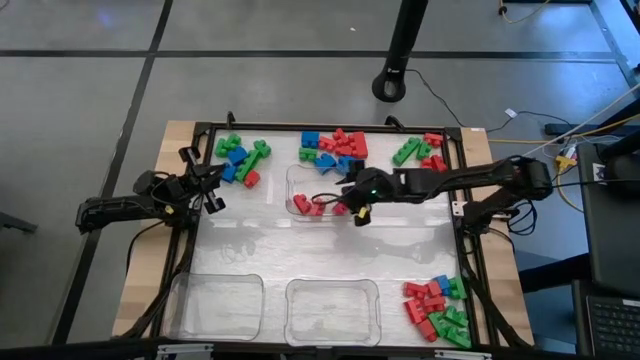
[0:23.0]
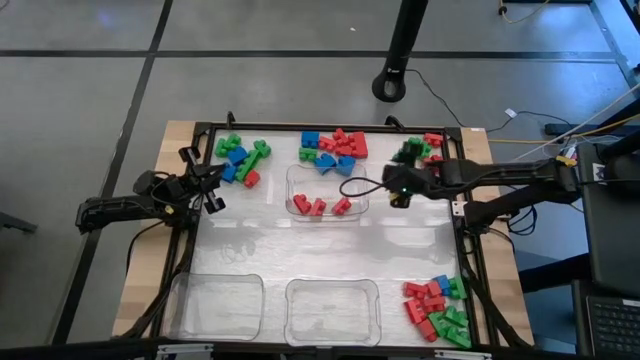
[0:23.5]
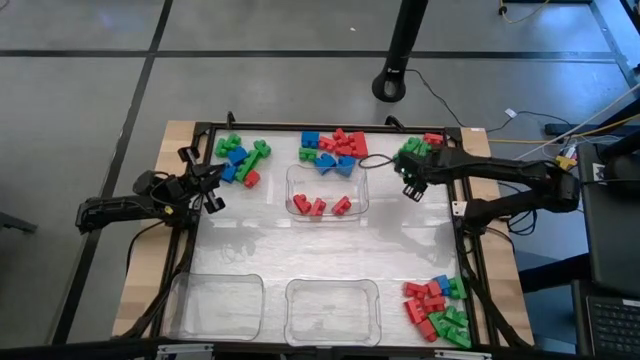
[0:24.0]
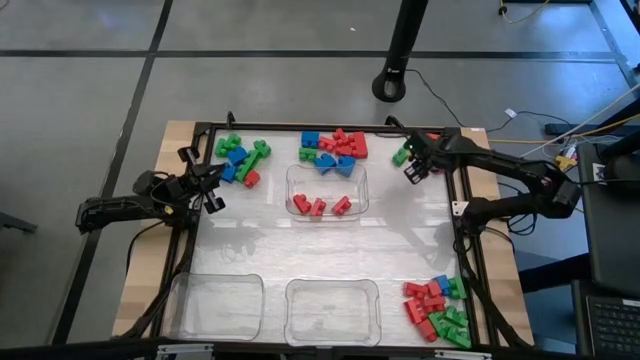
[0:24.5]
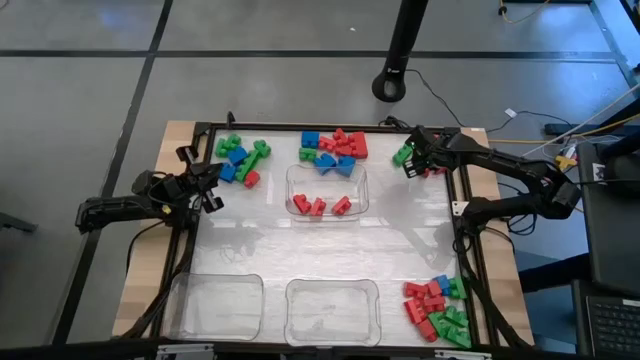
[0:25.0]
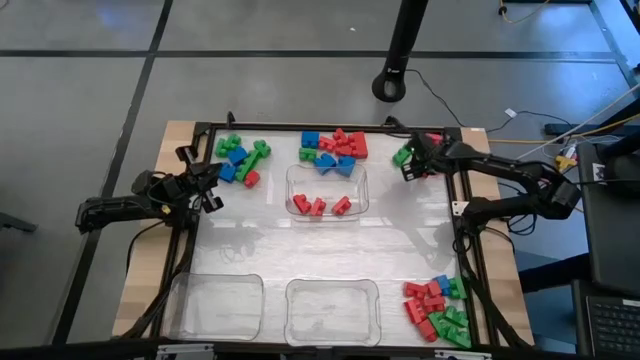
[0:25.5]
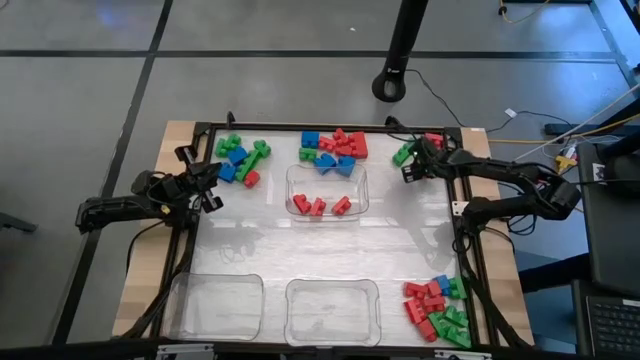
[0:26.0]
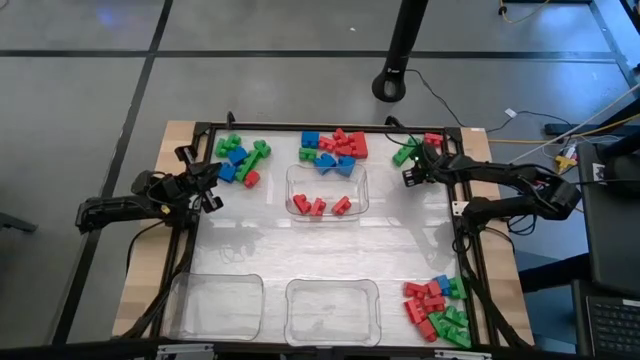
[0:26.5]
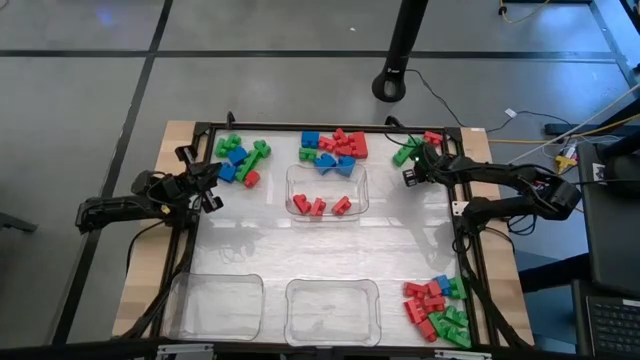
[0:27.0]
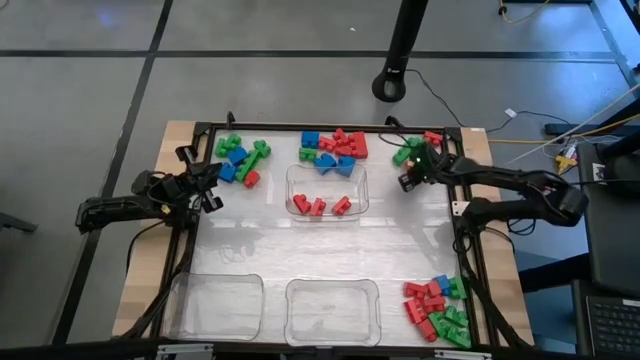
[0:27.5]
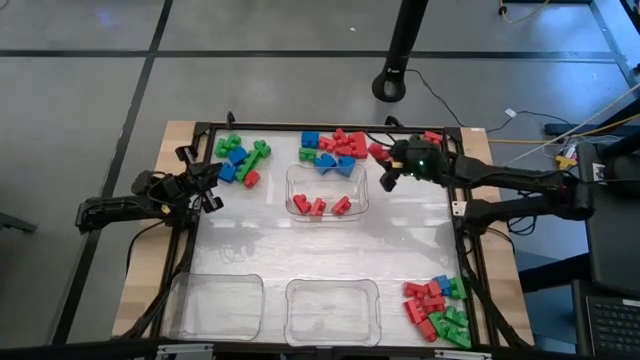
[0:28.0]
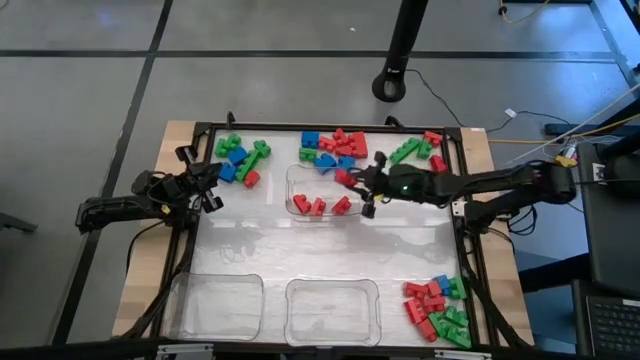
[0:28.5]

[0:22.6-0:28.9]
Task: Sort blocks
Put the red game piece into the top right transparent bin

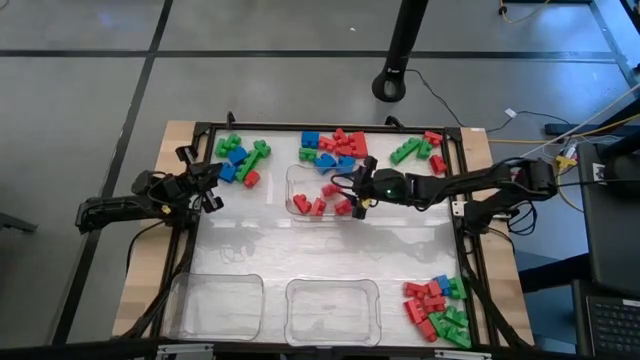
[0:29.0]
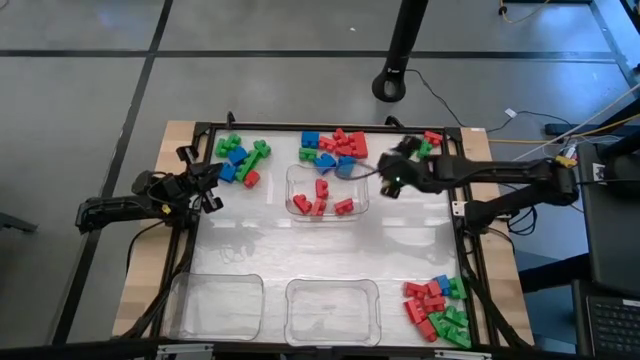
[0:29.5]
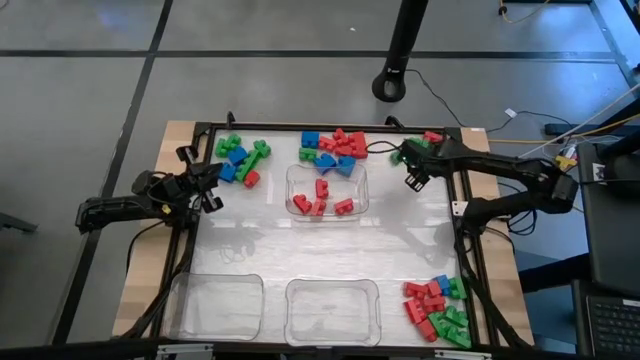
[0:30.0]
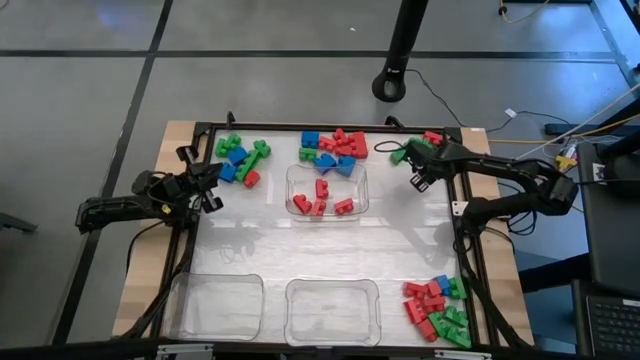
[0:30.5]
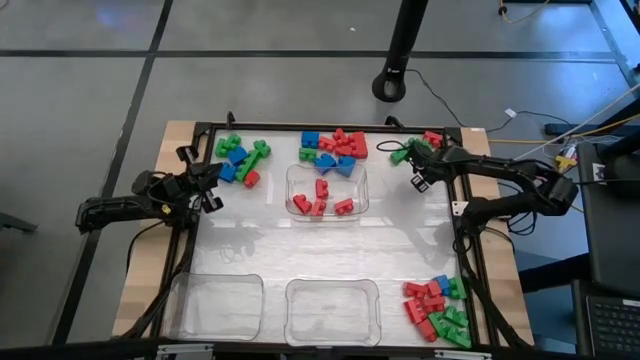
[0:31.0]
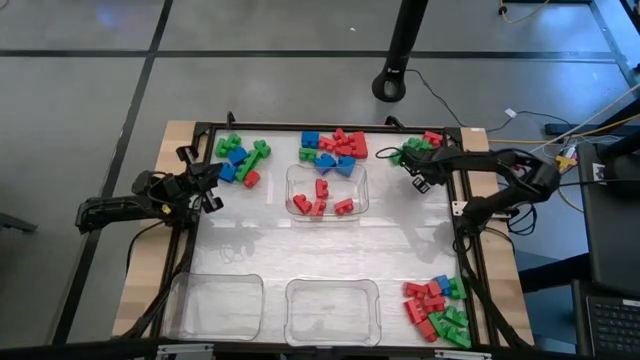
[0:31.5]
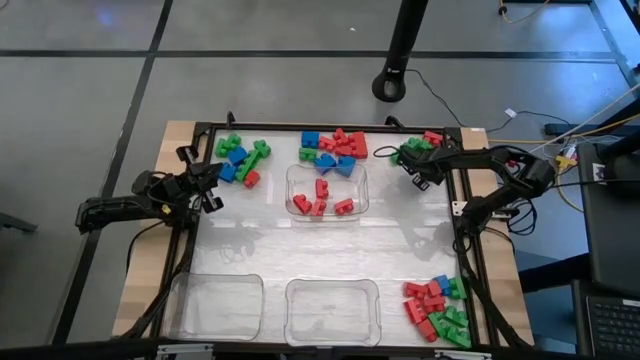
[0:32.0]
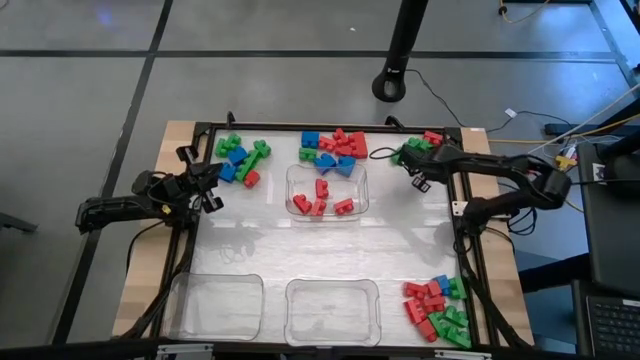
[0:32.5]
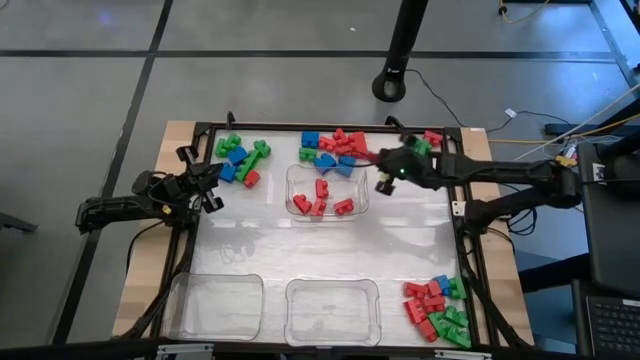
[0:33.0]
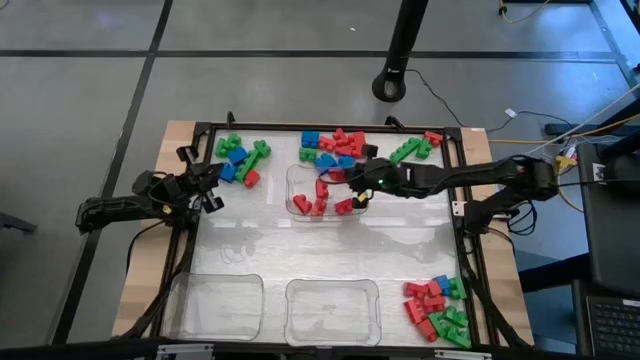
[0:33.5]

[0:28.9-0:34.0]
Put the red game piece into the top right transparent bin

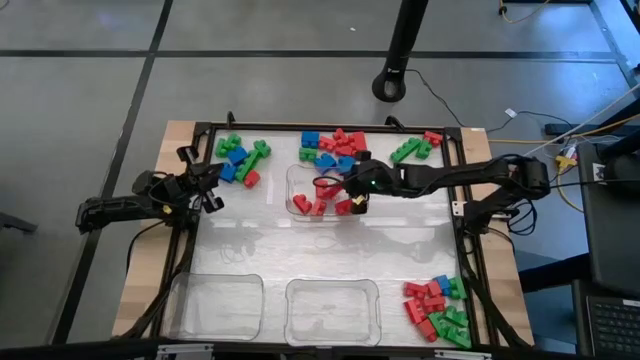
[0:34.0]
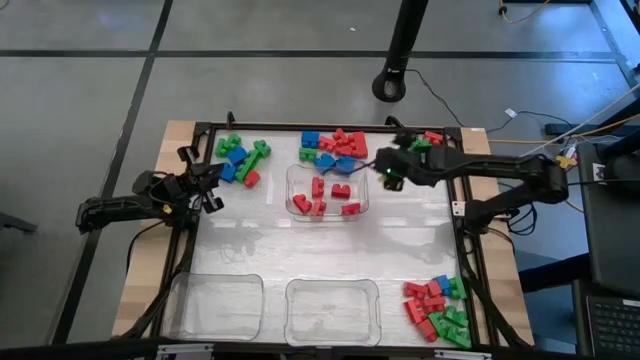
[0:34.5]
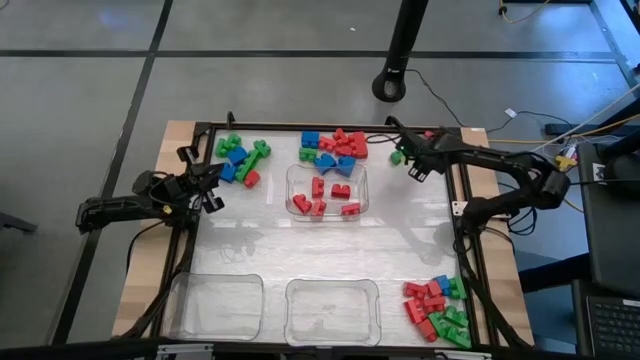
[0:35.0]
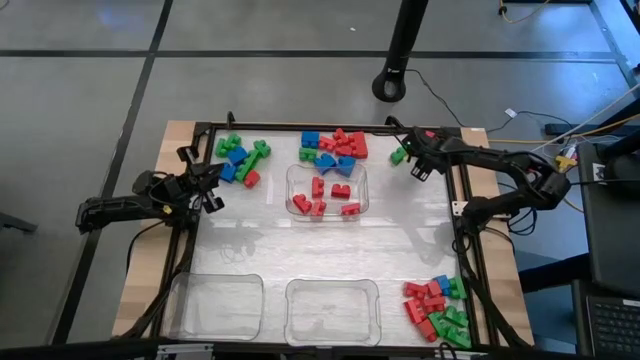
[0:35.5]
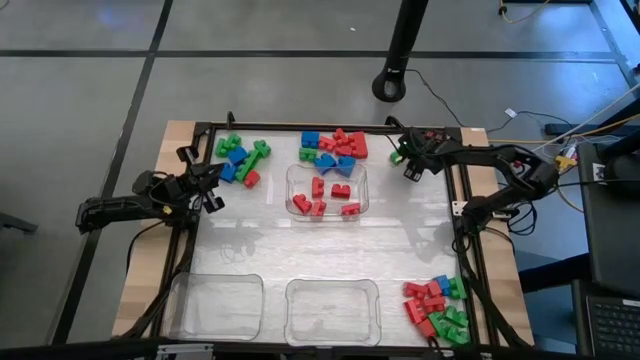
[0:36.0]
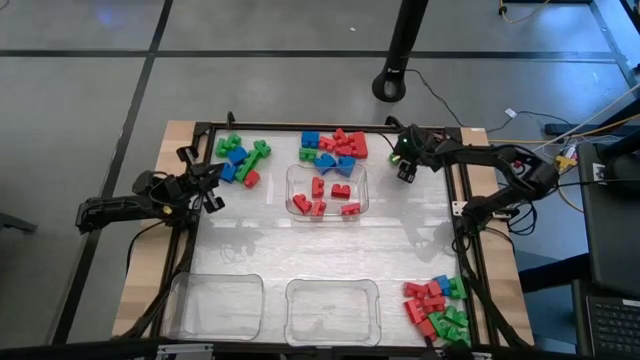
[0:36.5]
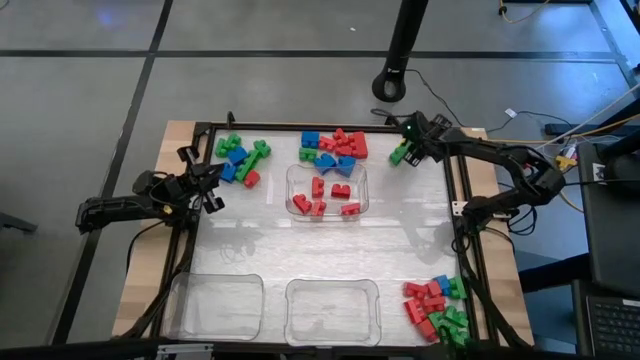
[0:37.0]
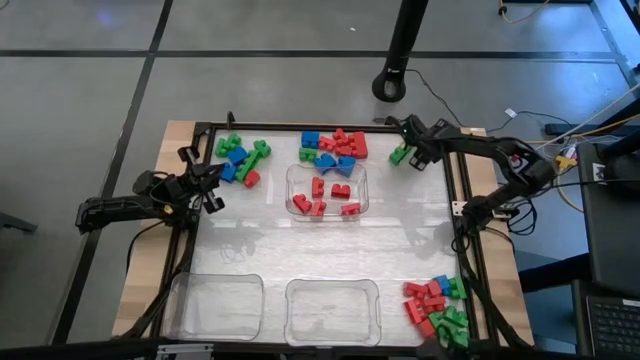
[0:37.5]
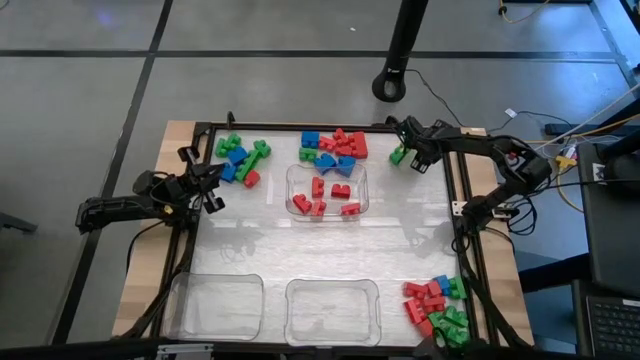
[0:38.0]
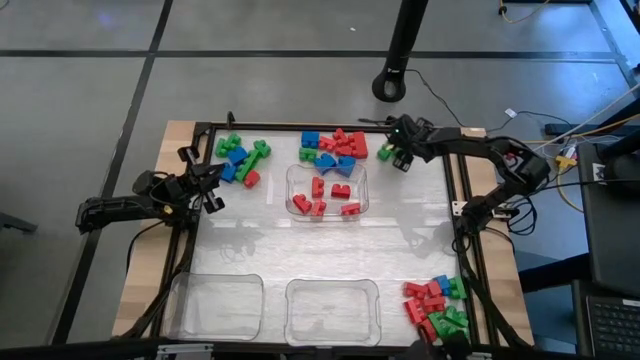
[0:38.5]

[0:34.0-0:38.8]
Adjust the green game piece on the table

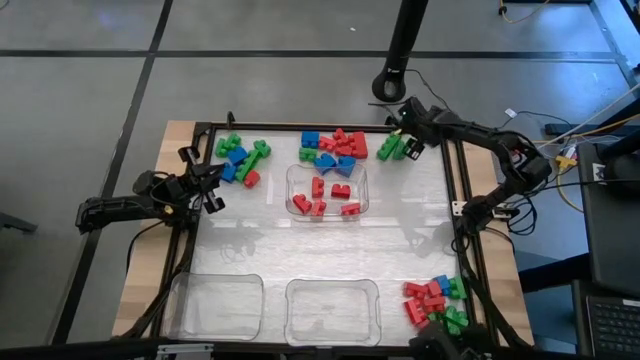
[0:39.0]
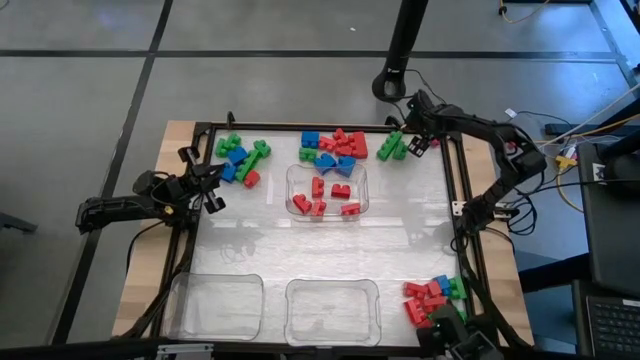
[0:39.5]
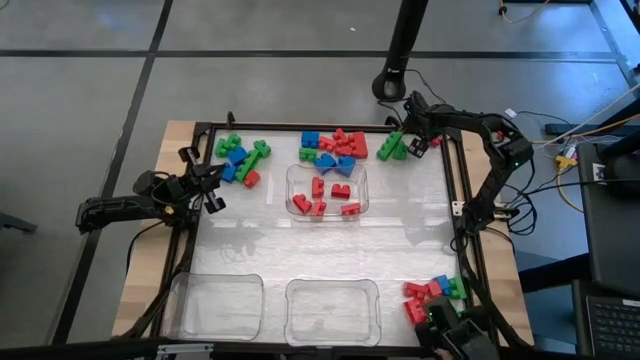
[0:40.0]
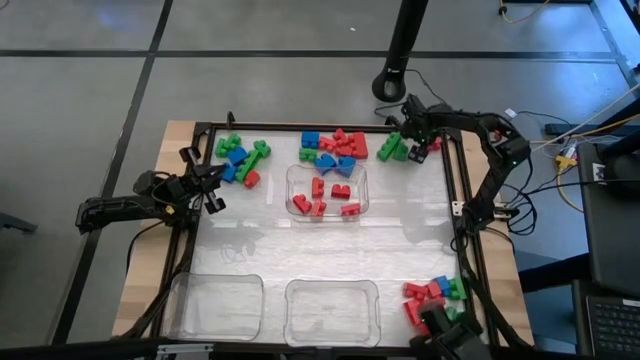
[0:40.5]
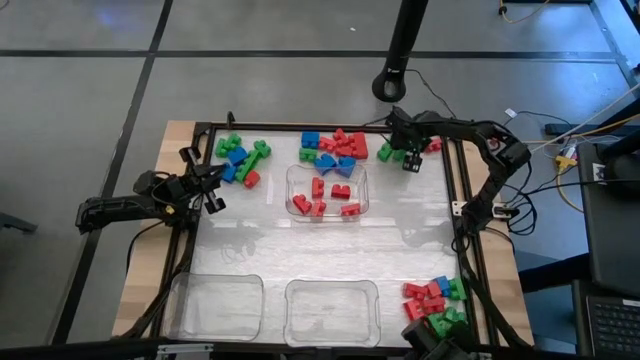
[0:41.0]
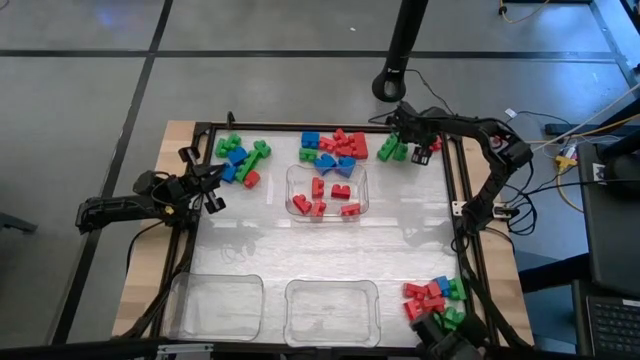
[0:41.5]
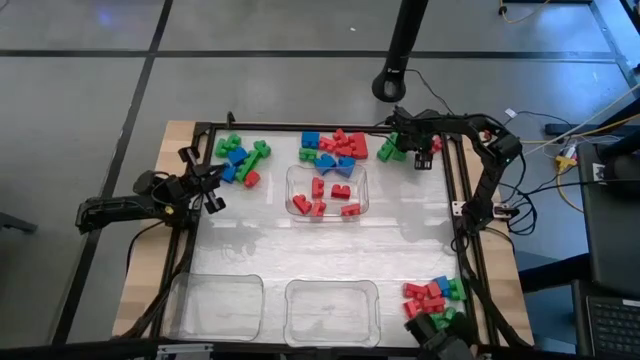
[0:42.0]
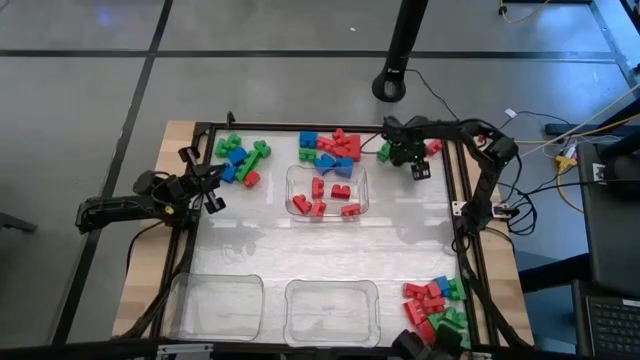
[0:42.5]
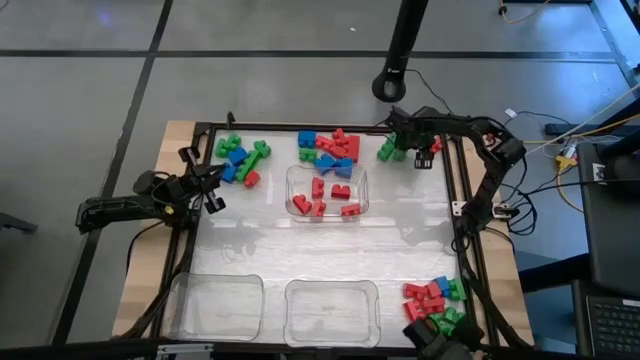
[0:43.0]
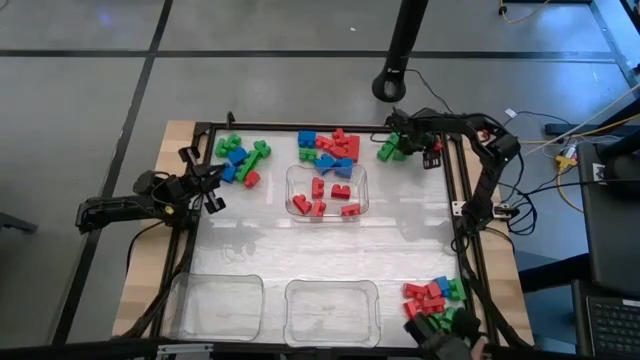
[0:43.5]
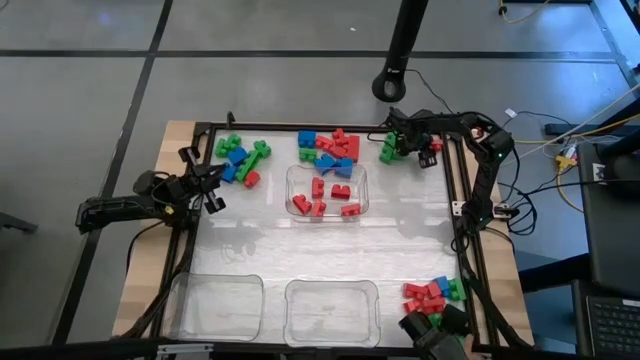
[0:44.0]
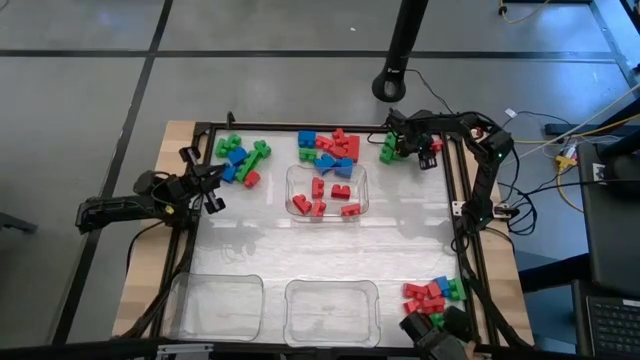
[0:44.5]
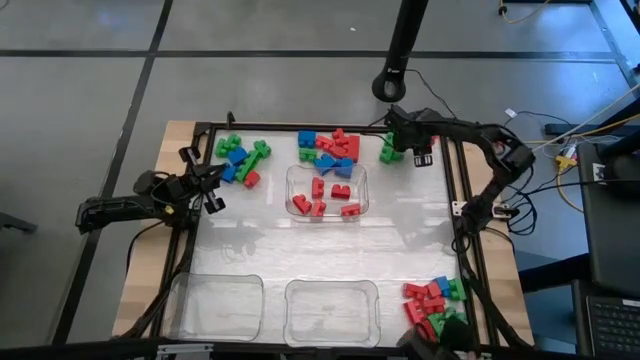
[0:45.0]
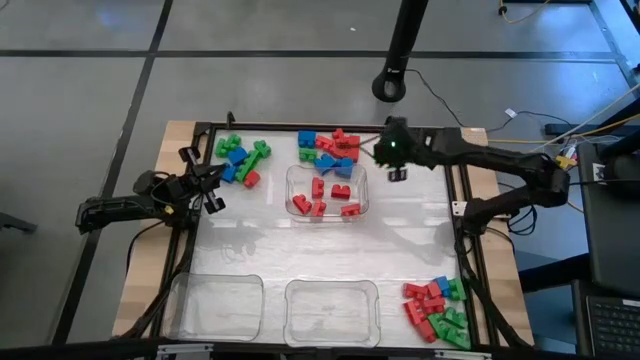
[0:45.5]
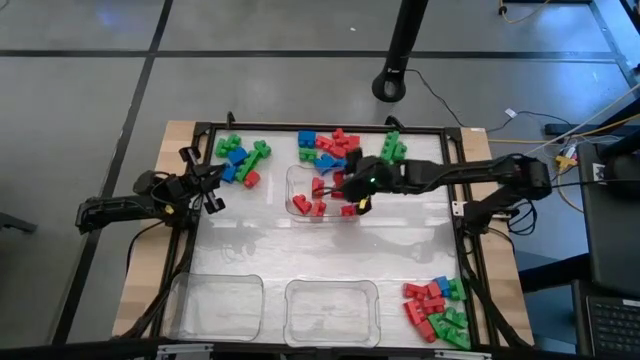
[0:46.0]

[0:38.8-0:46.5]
Put the red game piece into the top right transparent bin
